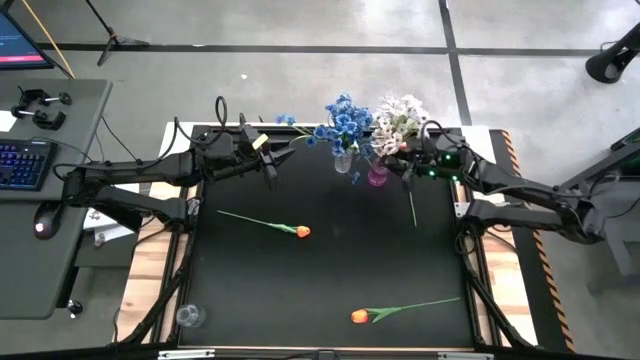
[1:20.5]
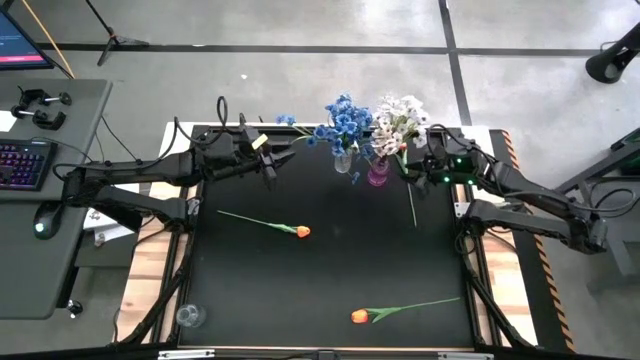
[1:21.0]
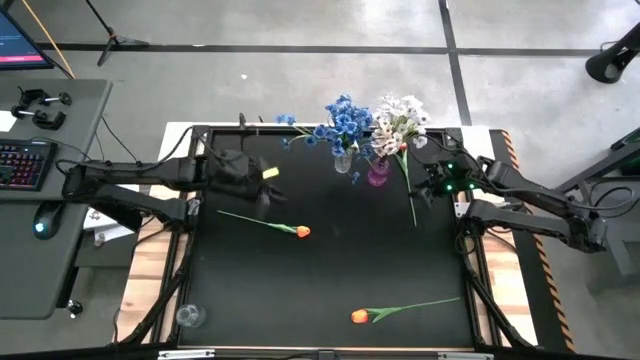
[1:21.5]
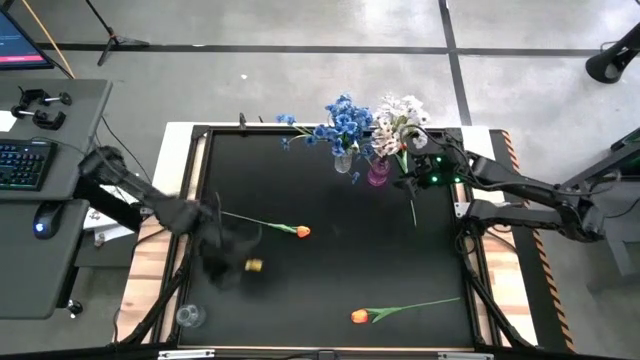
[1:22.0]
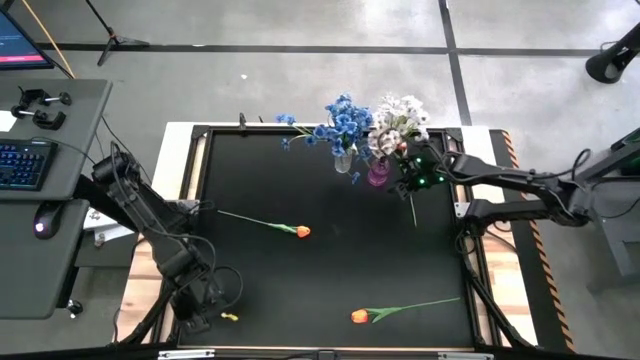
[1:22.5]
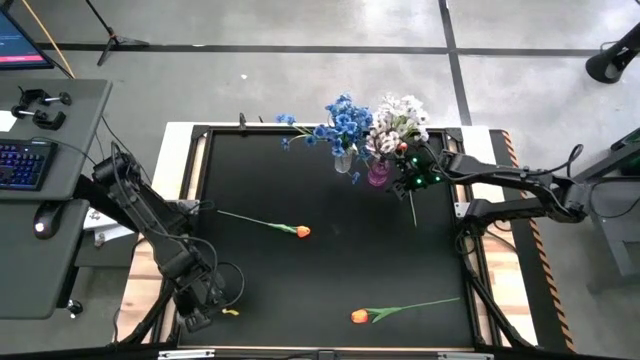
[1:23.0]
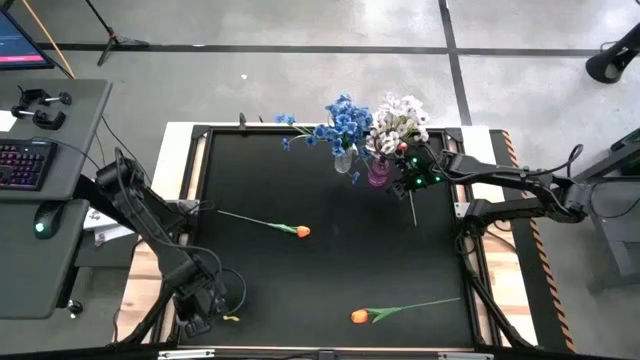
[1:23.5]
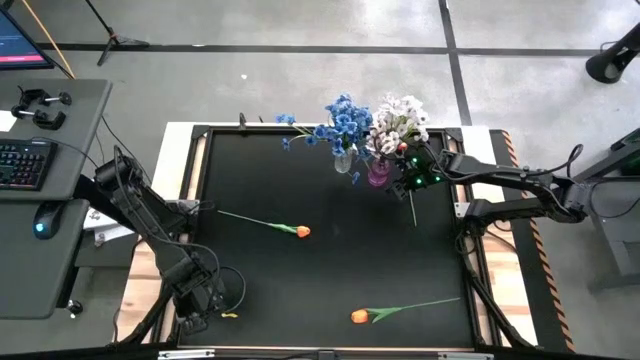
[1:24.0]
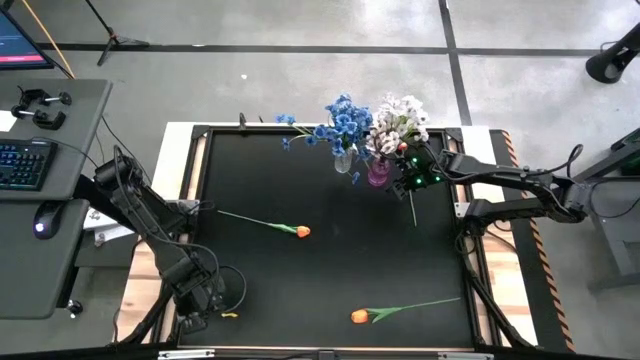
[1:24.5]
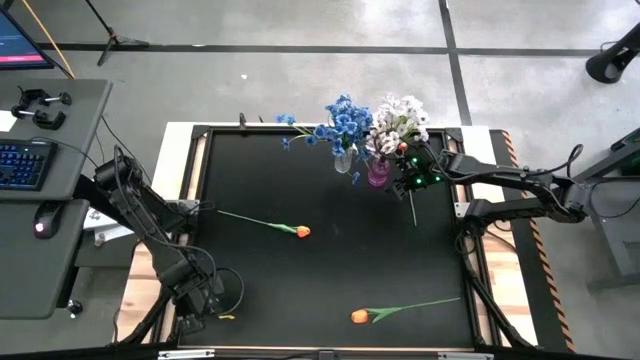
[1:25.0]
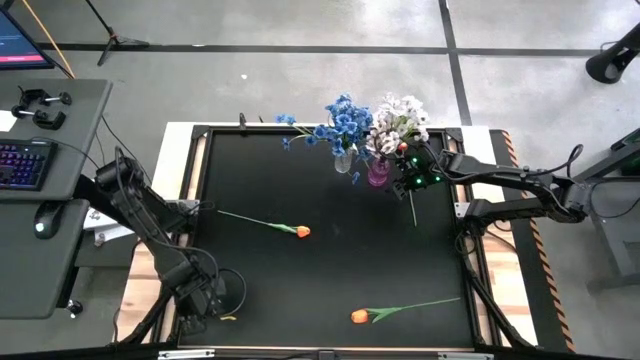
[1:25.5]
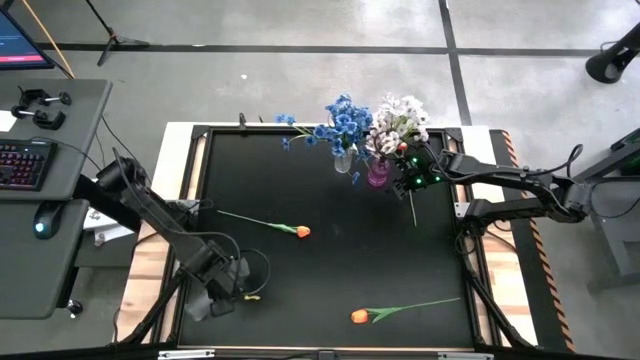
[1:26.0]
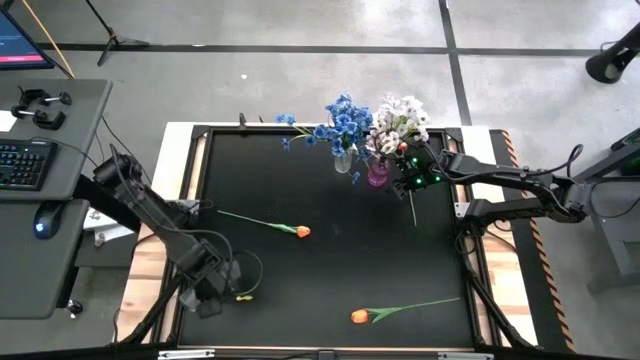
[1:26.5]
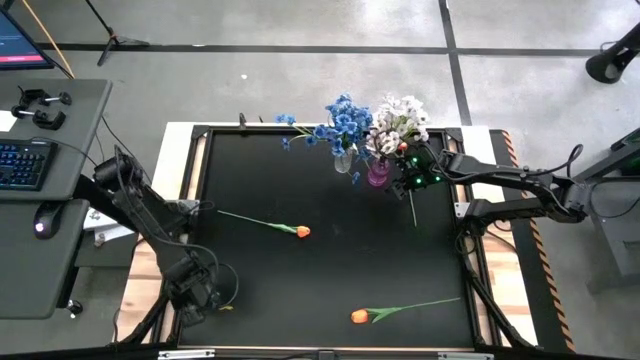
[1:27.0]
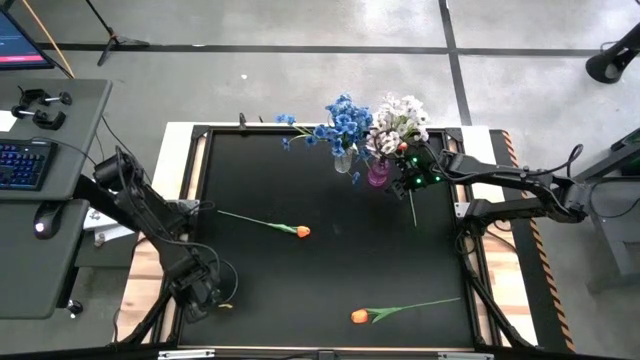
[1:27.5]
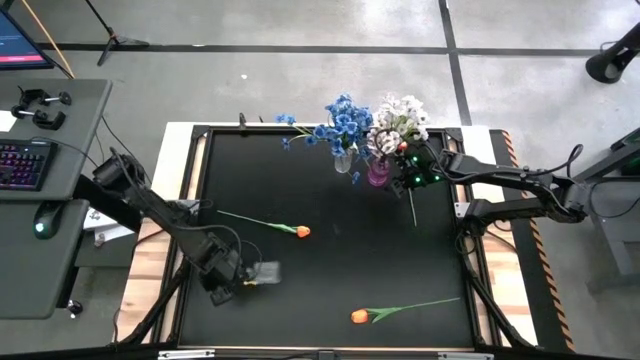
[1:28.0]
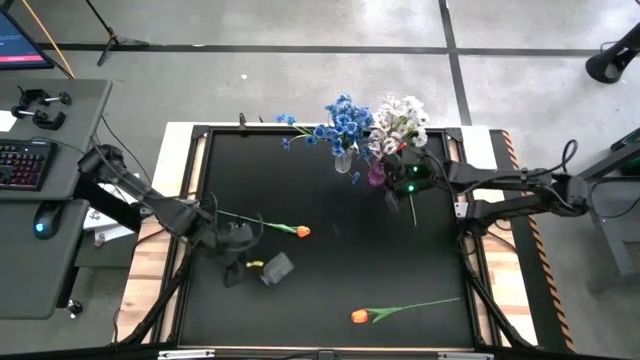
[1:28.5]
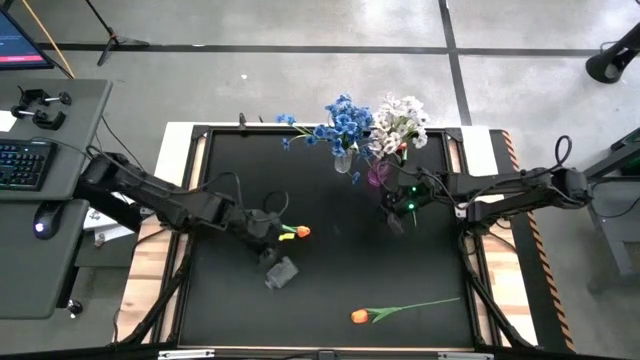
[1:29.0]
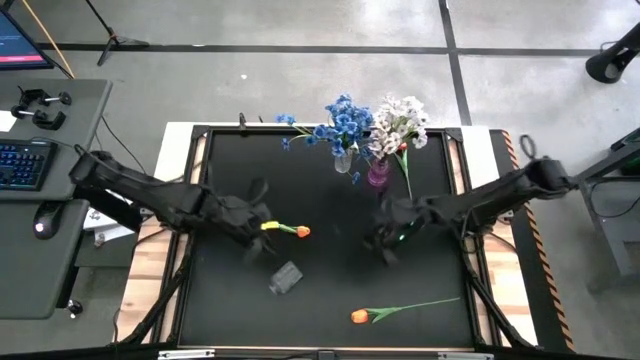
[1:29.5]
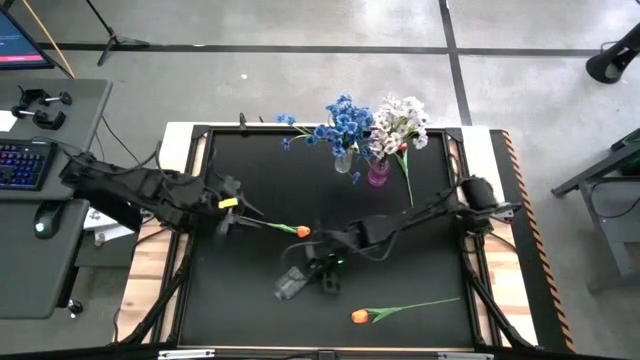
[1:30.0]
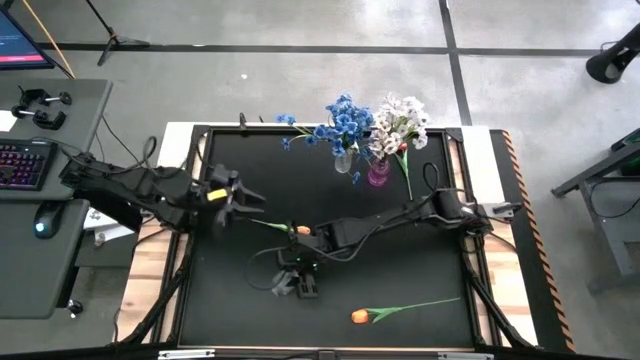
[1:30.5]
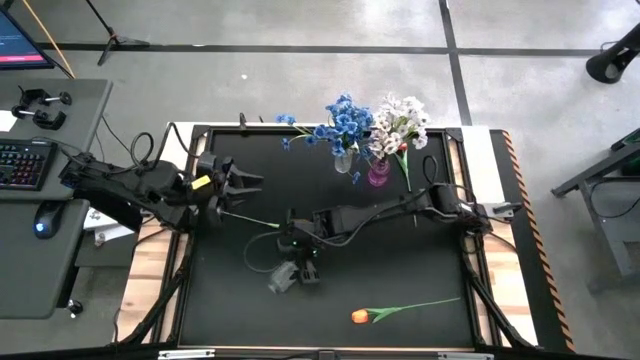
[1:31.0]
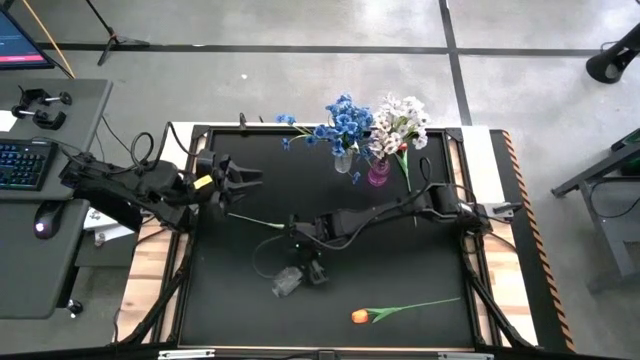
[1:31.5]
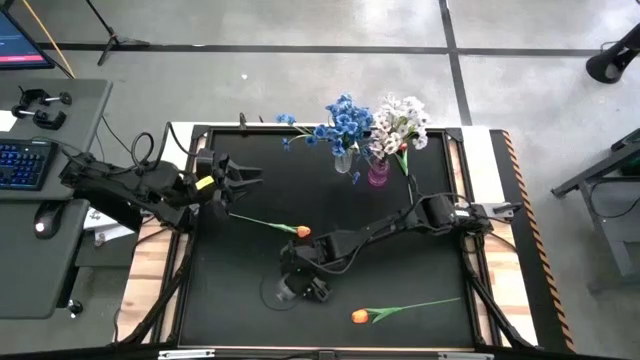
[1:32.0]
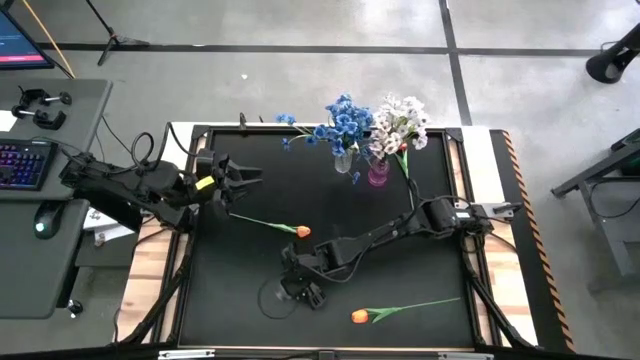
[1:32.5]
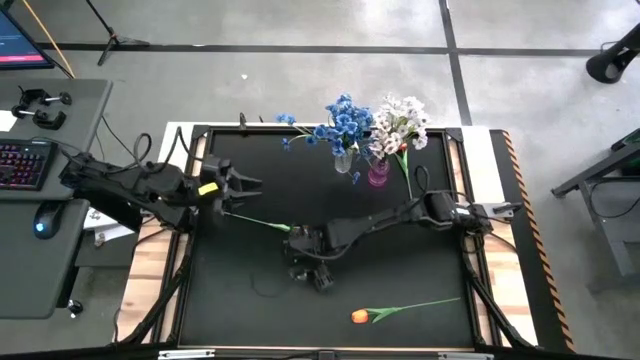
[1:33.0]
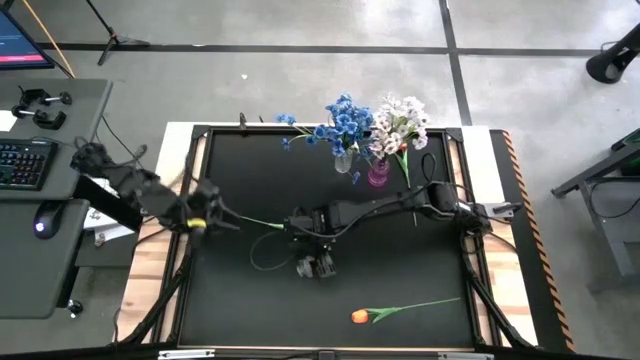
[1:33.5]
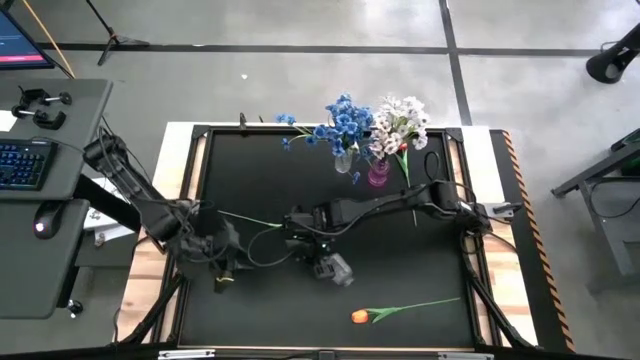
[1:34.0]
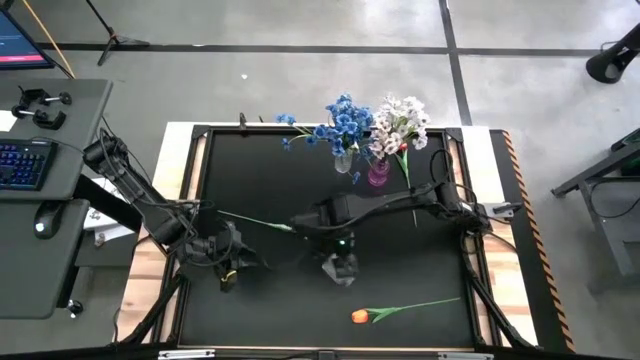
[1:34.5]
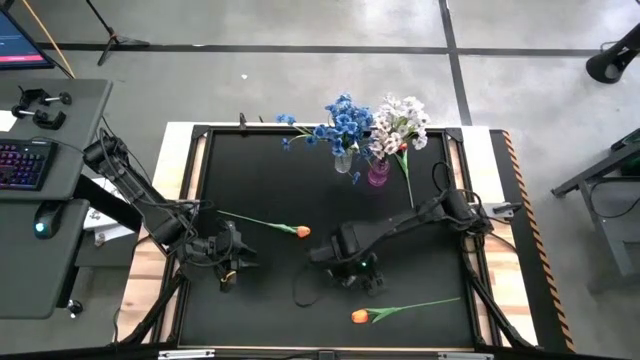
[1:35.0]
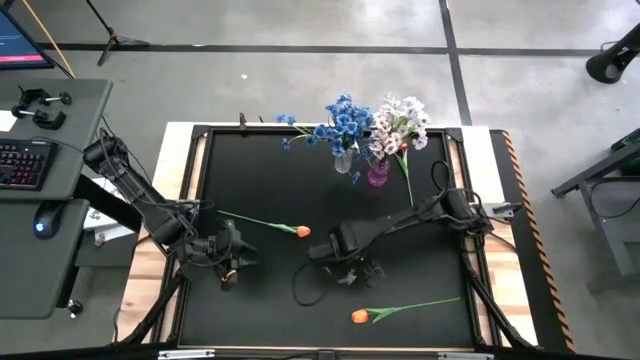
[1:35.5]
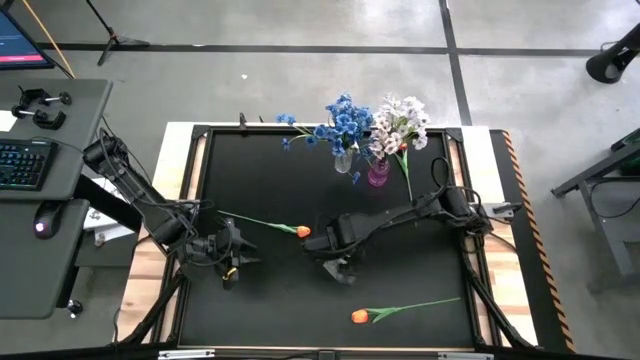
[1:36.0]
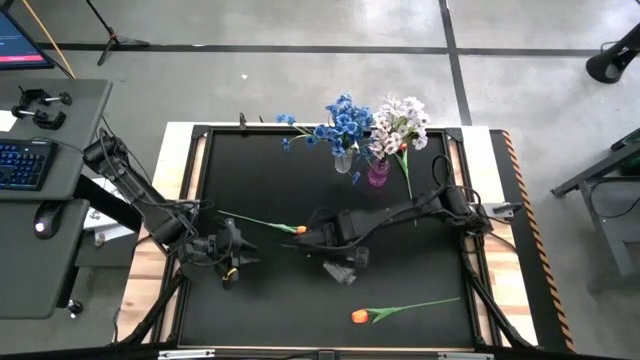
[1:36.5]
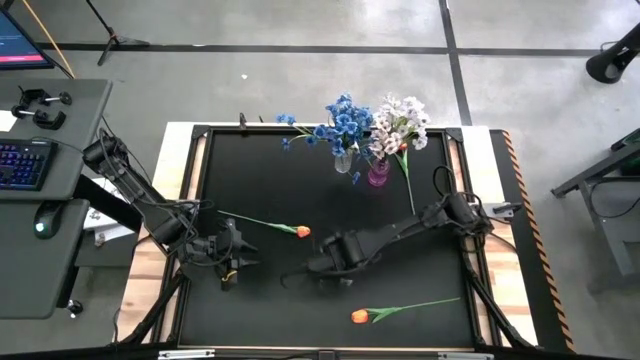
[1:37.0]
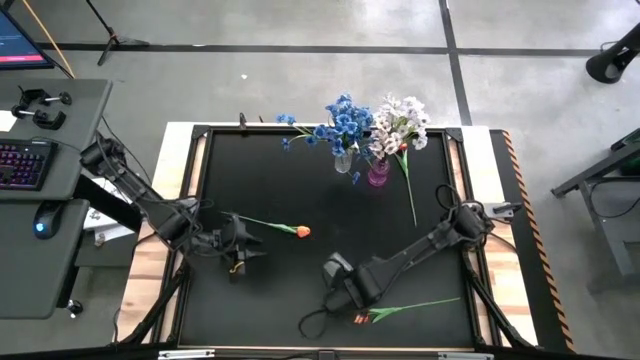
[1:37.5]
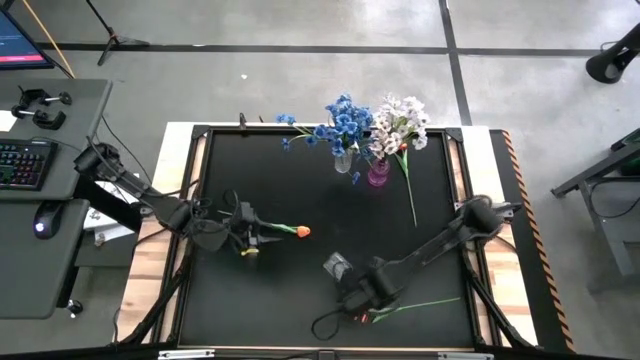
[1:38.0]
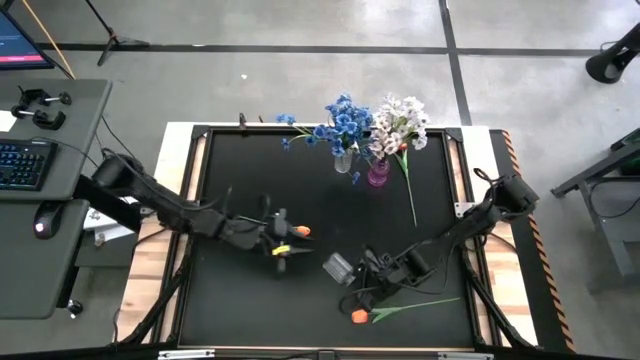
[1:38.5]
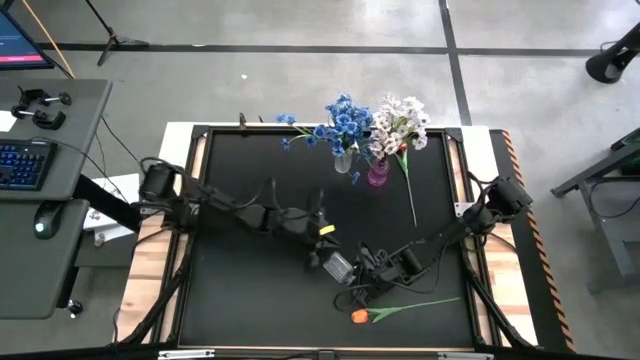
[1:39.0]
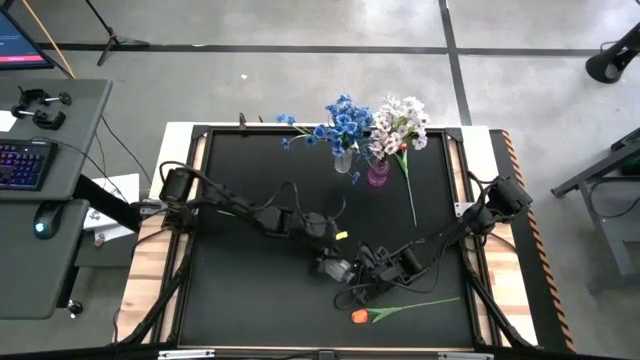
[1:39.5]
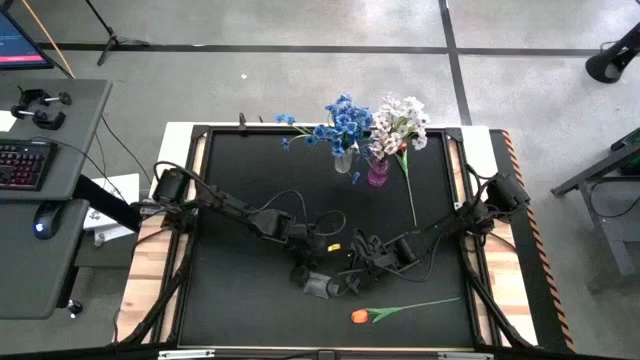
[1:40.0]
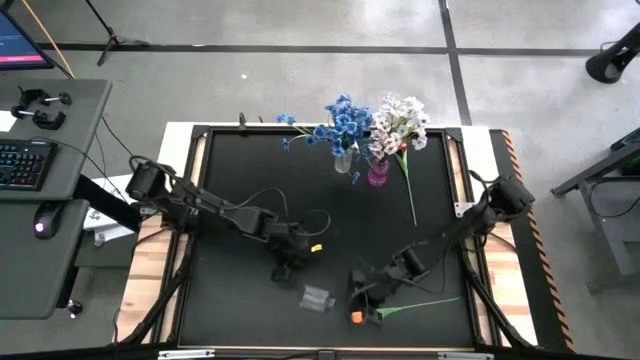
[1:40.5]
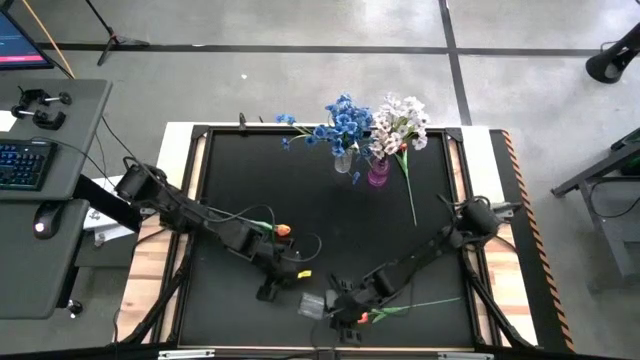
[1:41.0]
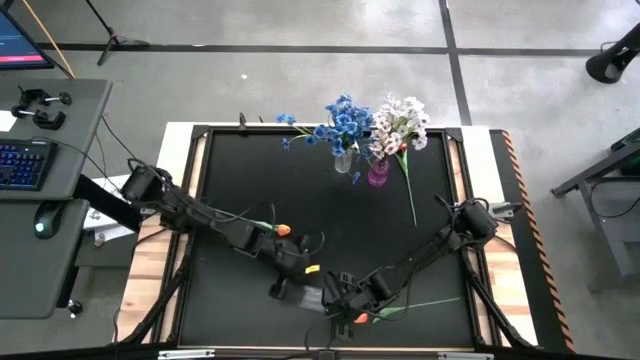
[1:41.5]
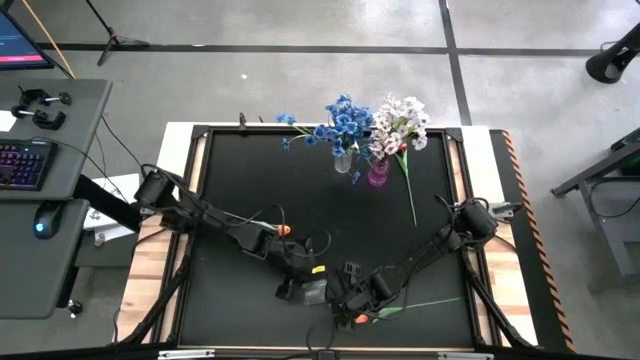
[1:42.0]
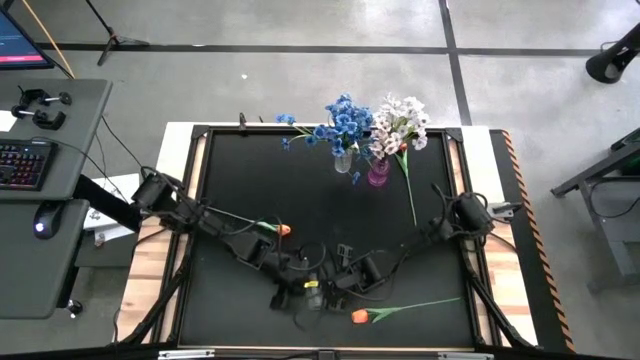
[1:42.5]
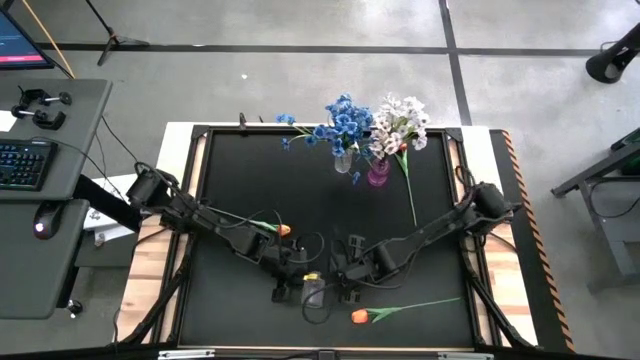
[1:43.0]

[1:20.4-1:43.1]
Task: Sort flowers into vase by color
Move the bottom transparent vase to the center table
